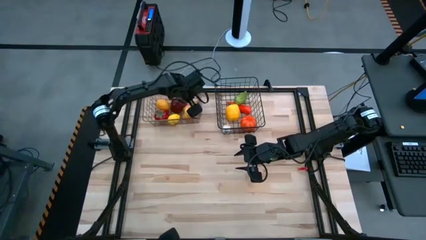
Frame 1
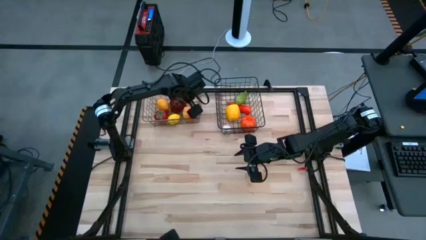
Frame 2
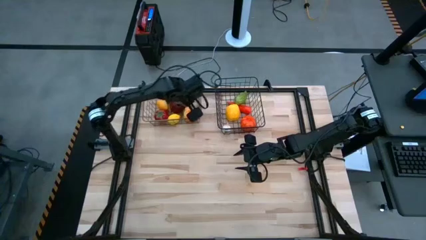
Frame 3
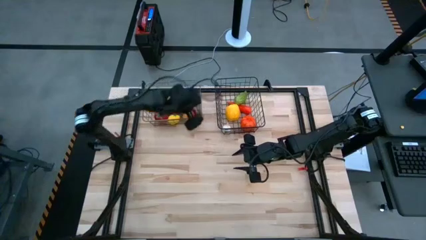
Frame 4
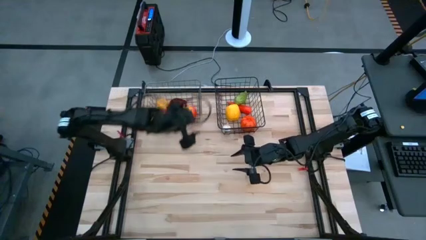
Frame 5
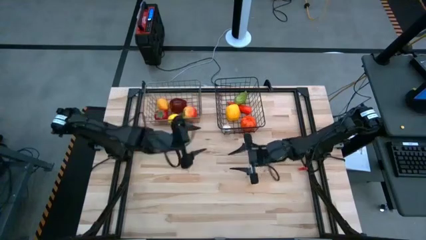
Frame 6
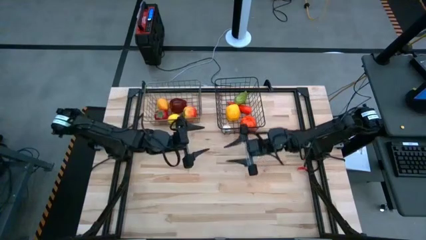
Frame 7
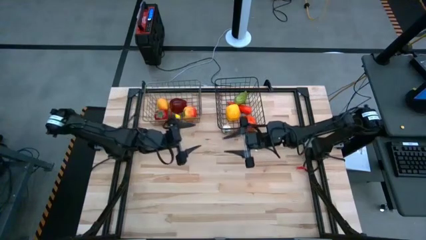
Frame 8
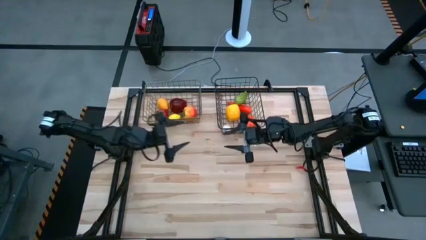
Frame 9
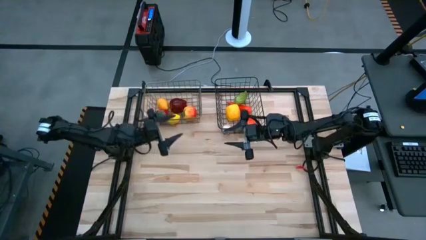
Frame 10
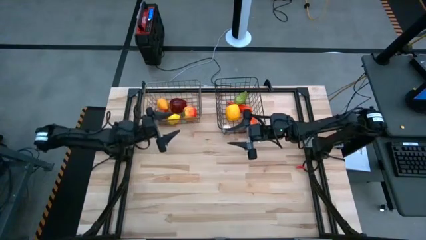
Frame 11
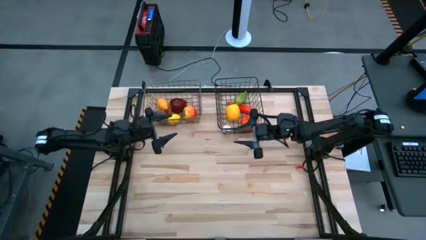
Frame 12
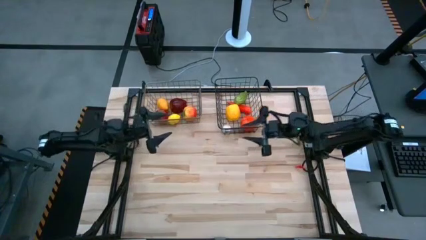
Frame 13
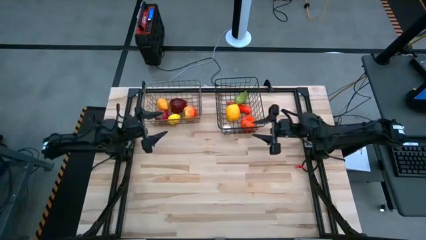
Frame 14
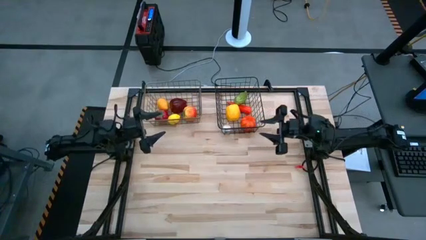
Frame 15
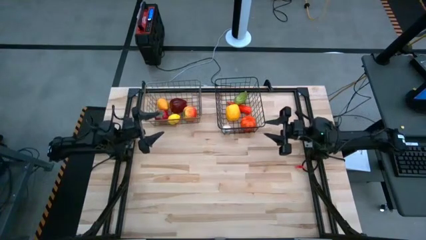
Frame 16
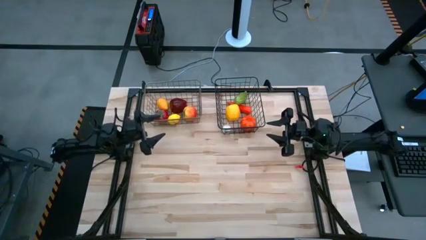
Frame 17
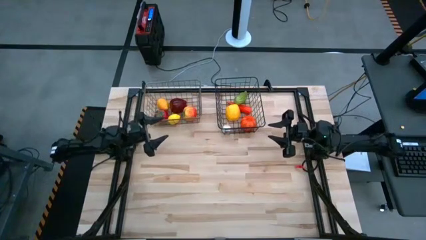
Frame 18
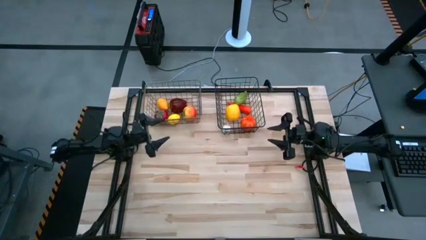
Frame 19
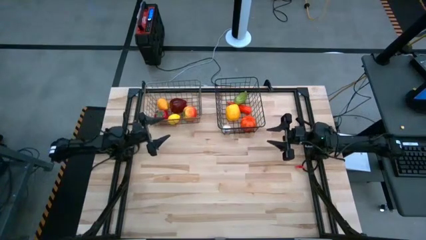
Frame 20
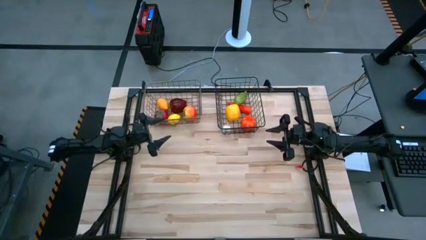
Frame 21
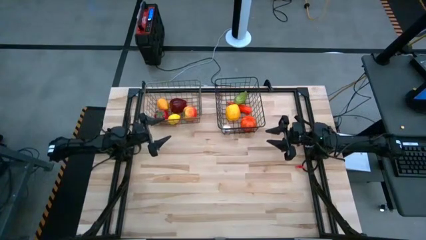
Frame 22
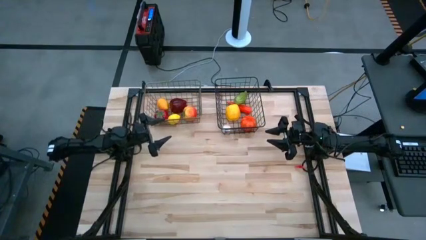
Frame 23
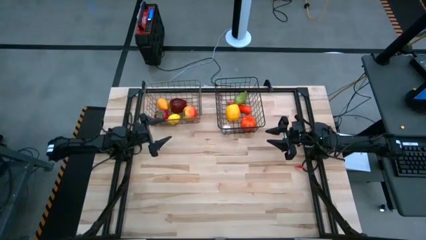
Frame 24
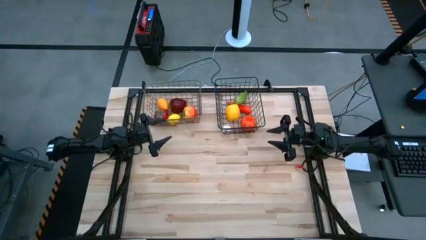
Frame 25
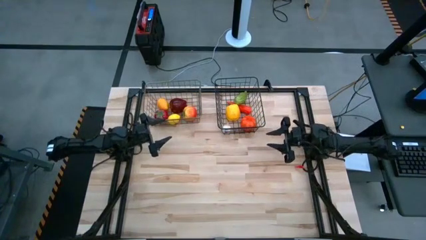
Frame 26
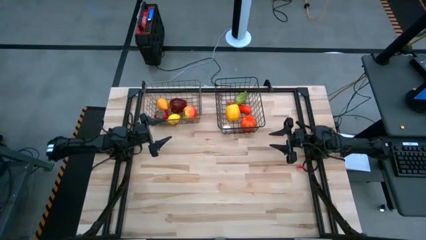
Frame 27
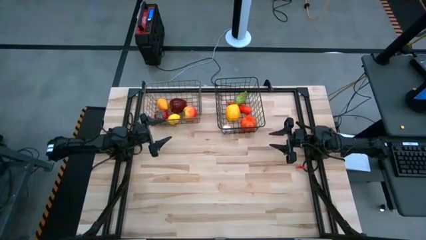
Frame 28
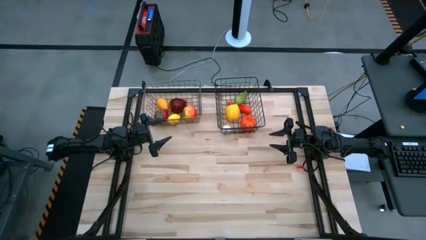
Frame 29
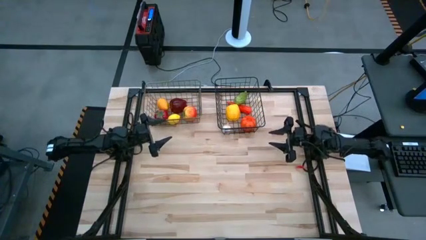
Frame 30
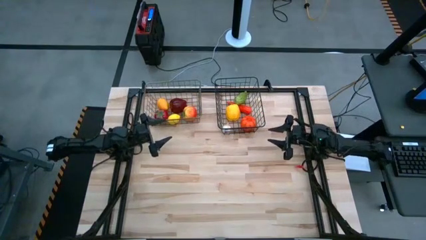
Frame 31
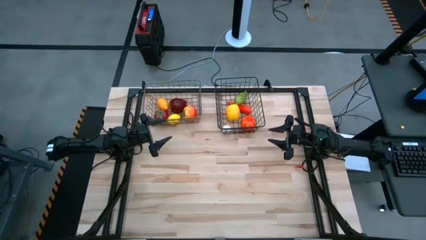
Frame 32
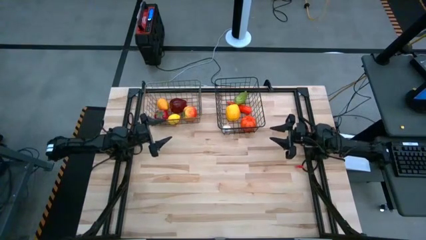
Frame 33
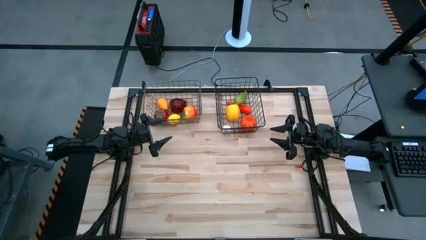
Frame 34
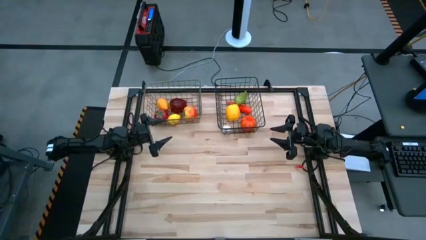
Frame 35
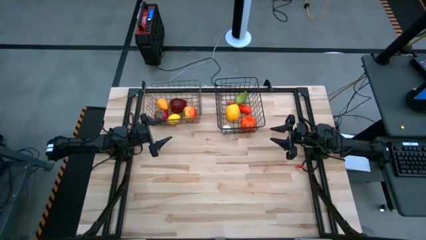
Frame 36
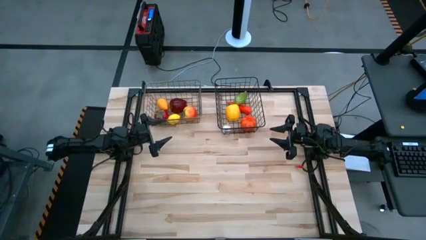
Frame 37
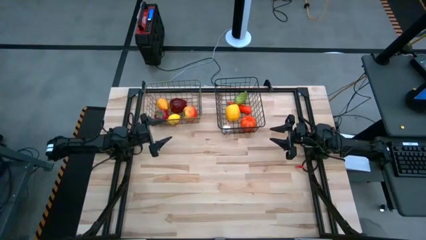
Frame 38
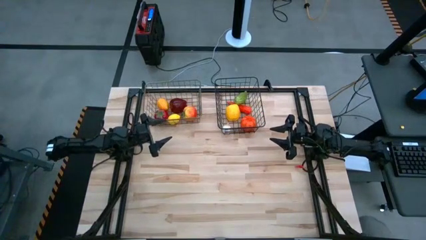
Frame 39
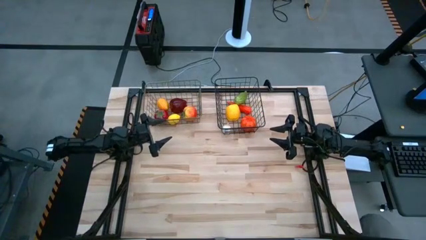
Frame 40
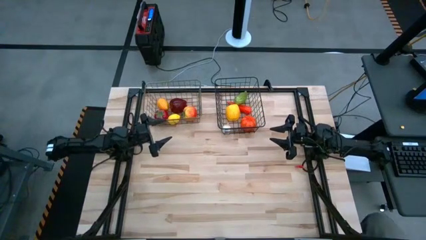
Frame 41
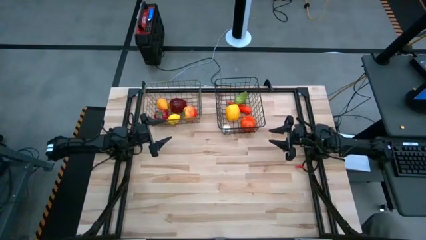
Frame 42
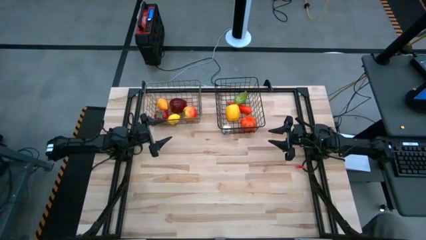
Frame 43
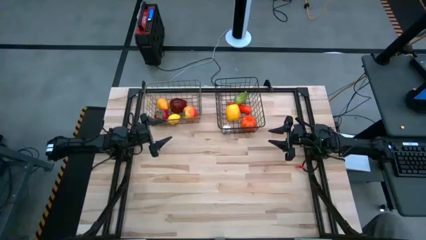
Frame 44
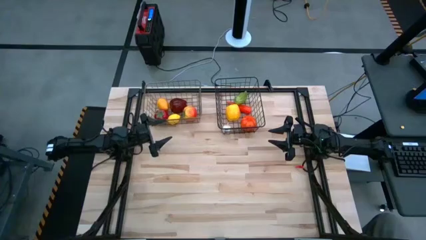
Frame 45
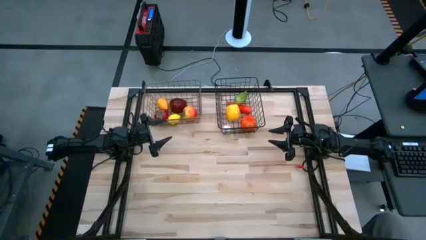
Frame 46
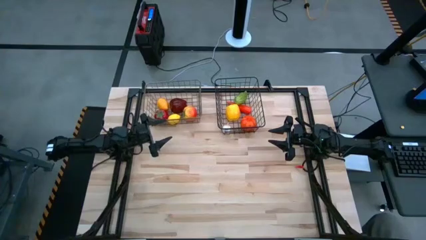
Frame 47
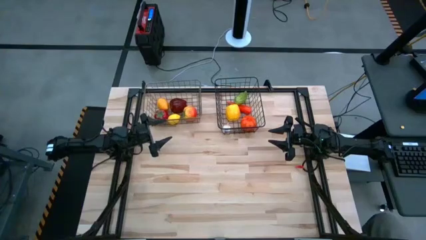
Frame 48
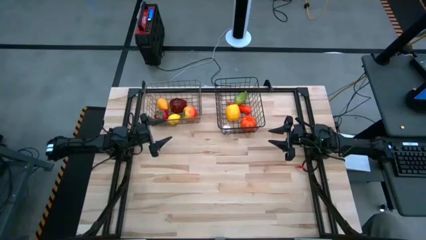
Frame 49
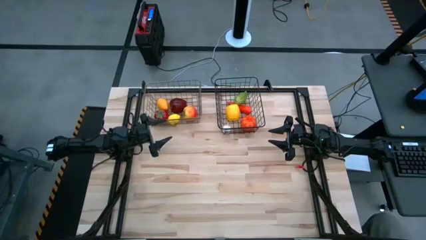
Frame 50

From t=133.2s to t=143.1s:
Task: Sort produce into baskets
Return to Home Position

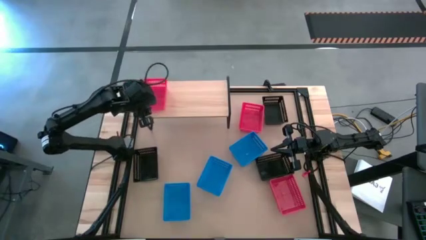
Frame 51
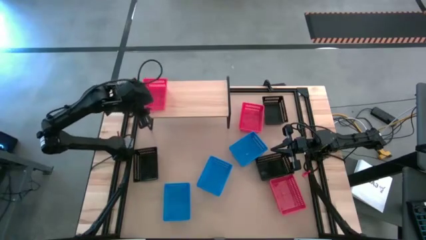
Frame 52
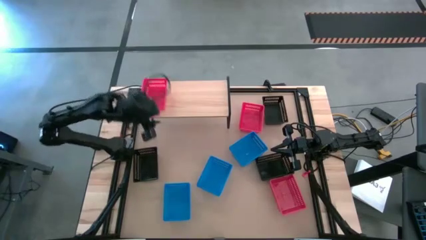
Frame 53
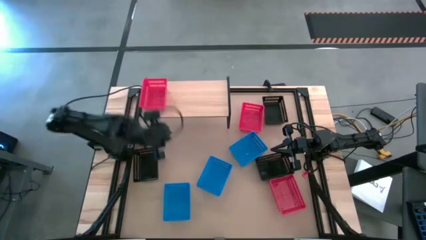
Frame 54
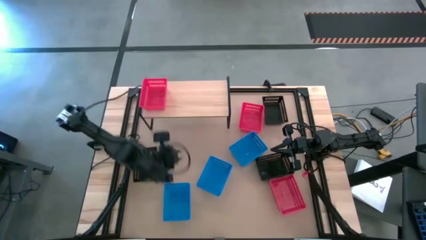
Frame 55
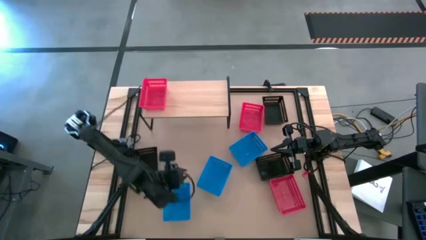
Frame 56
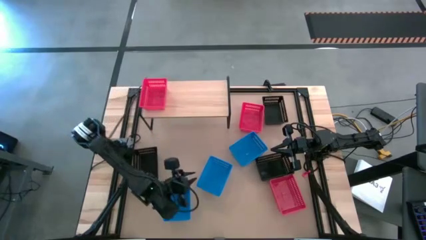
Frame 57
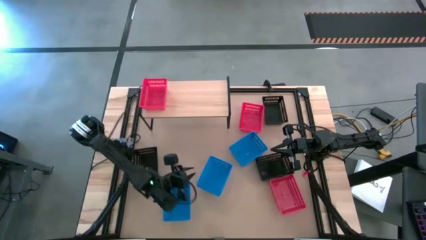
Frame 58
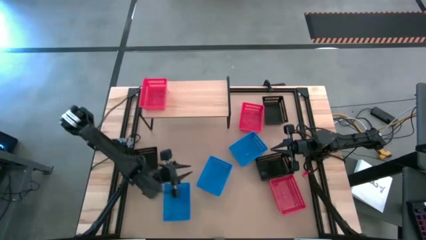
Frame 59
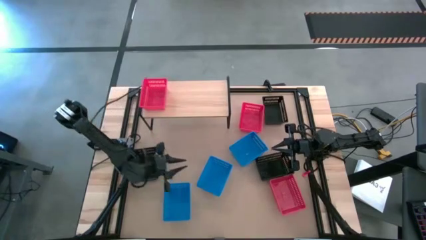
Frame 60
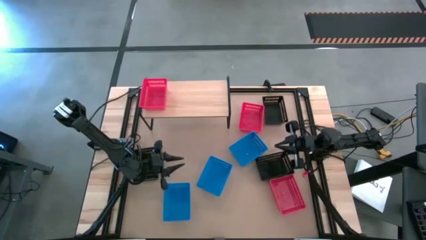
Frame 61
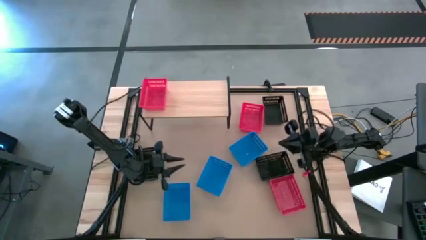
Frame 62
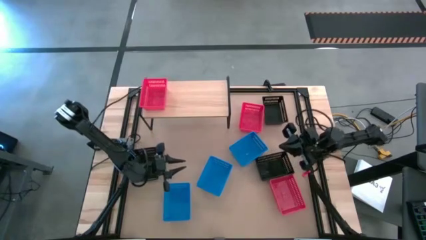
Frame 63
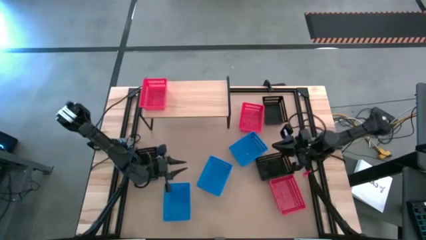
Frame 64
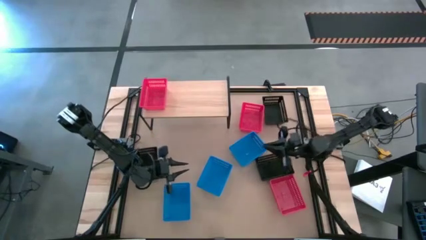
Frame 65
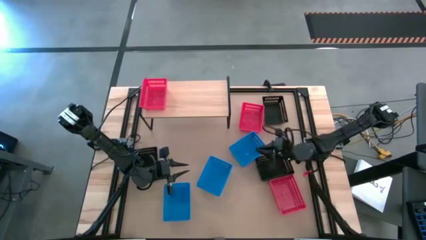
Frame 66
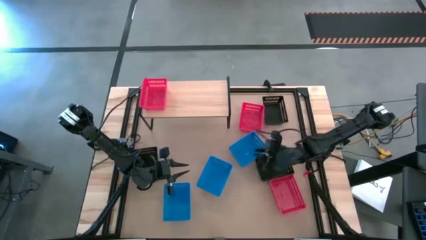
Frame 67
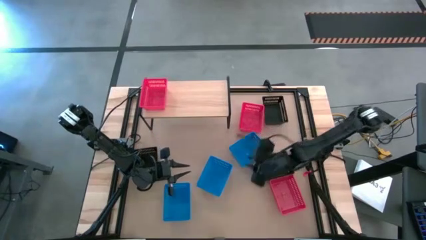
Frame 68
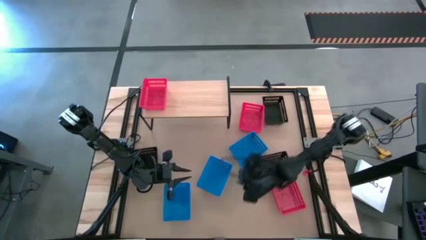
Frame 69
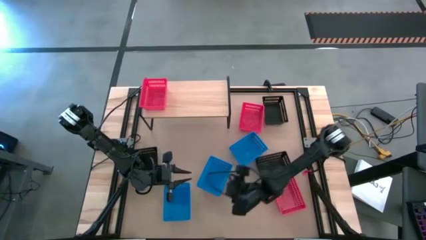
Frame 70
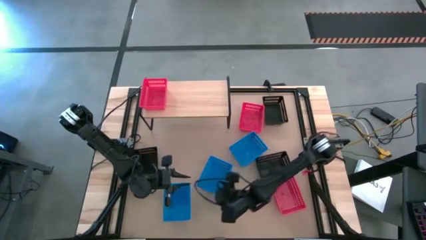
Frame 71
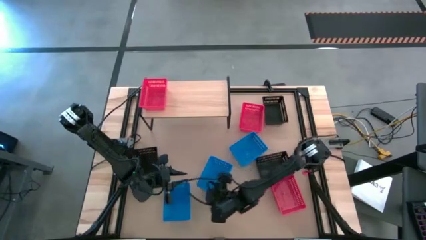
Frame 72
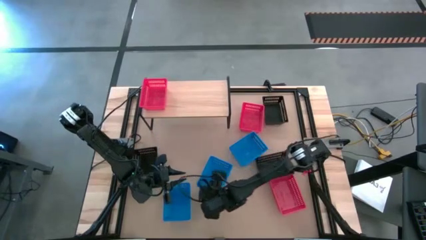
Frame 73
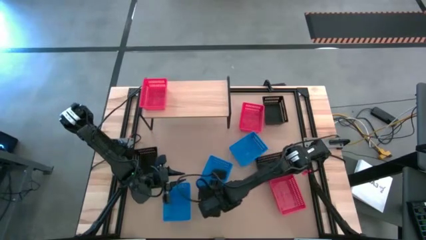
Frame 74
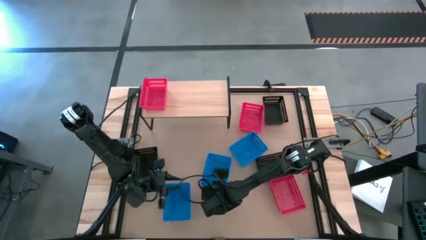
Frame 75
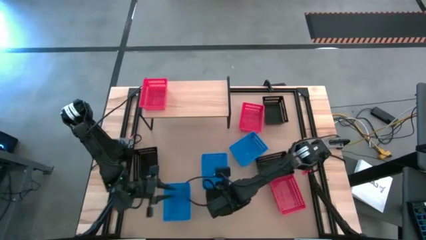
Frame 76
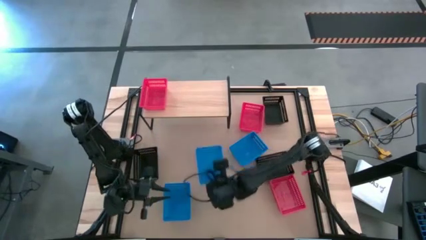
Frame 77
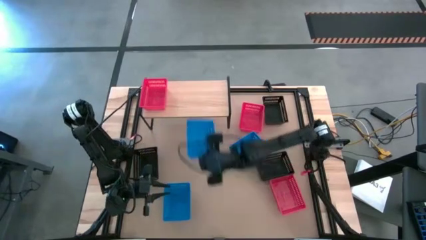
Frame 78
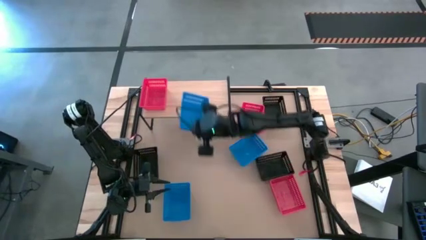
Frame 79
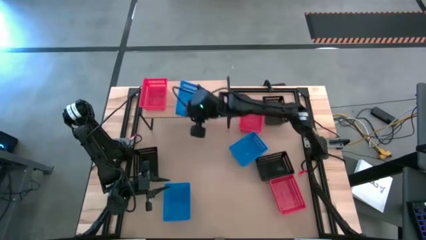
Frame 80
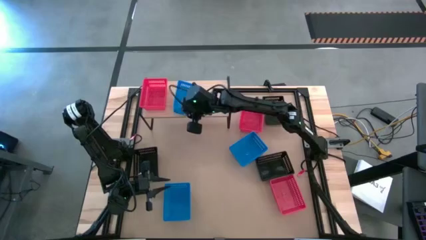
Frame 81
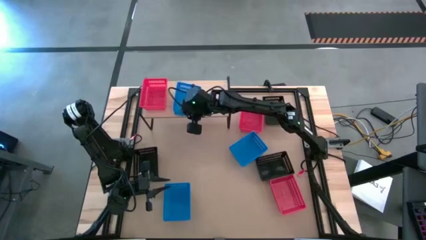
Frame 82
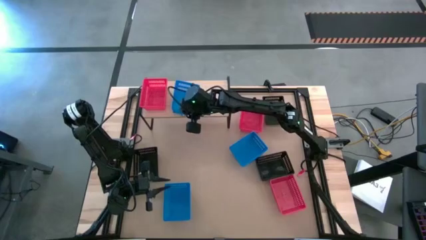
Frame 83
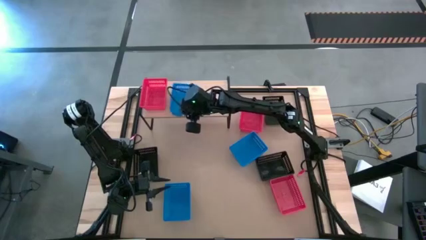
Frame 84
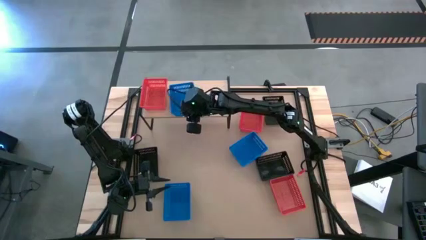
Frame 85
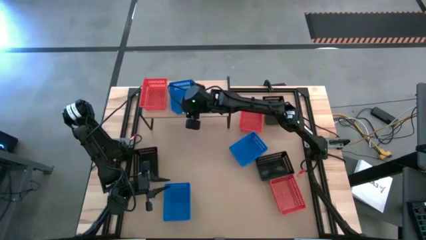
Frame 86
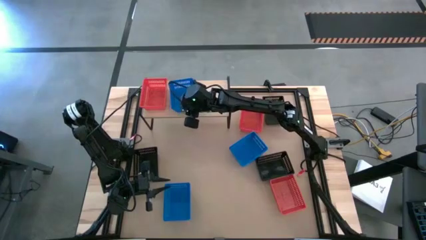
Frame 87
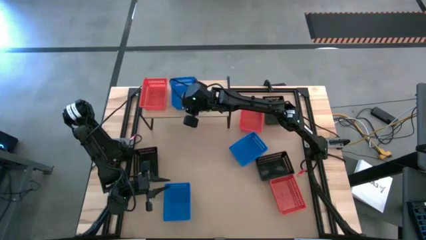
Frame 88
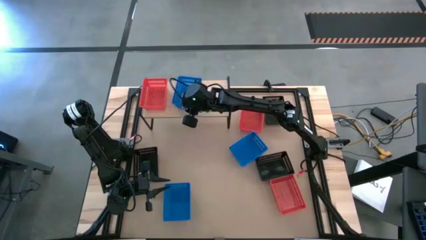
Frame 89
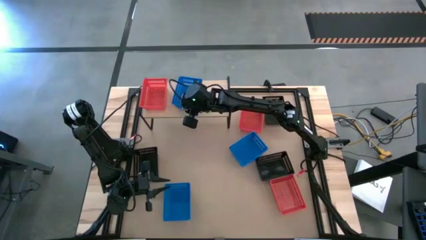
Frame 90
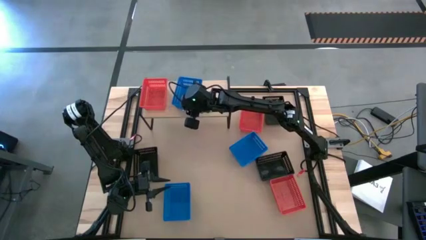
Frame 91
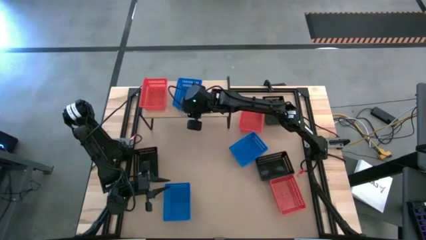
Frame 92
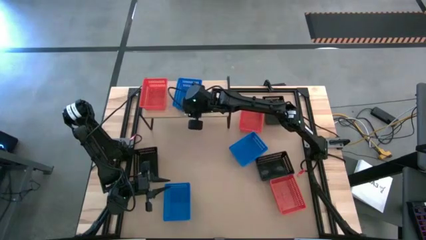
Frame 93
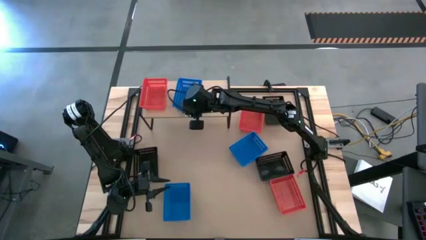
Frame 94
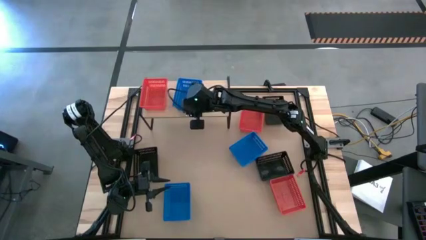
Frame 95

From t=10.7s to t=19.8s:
Task: Stack baskets on shelf by color
Put the middle blue bin on the shelf
